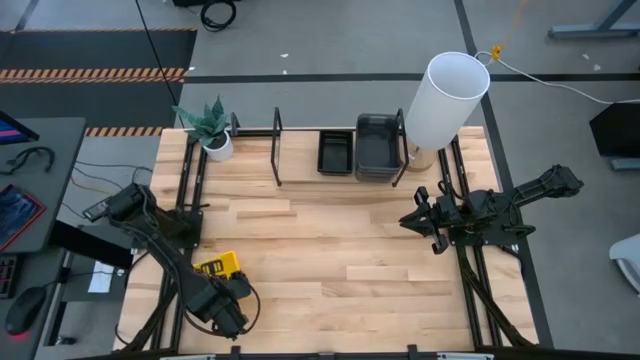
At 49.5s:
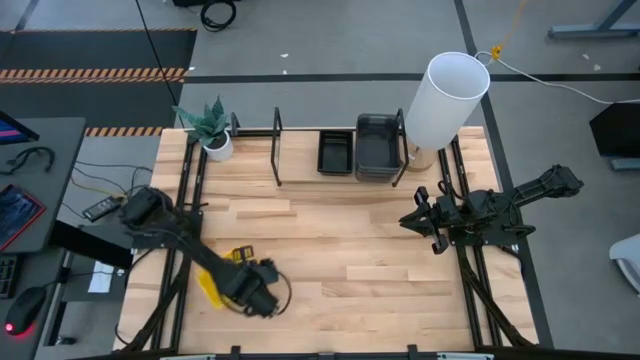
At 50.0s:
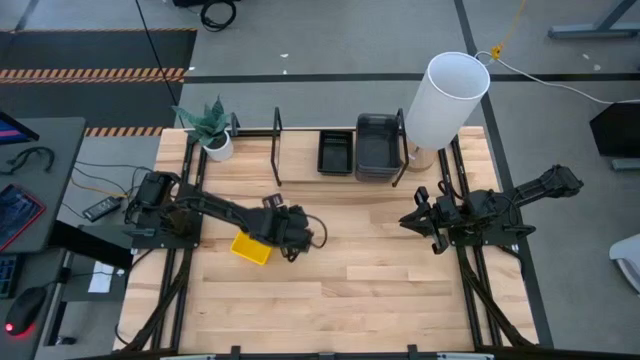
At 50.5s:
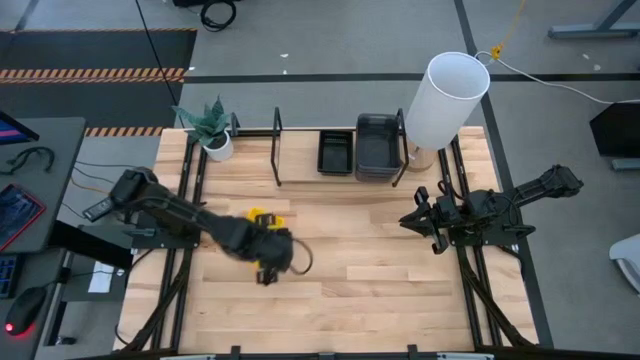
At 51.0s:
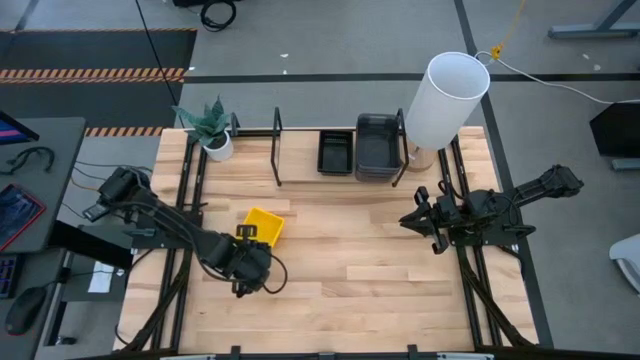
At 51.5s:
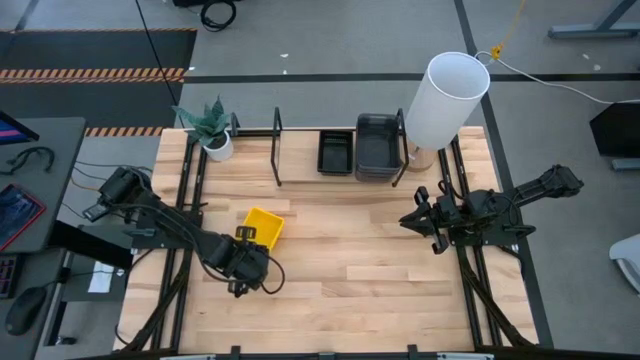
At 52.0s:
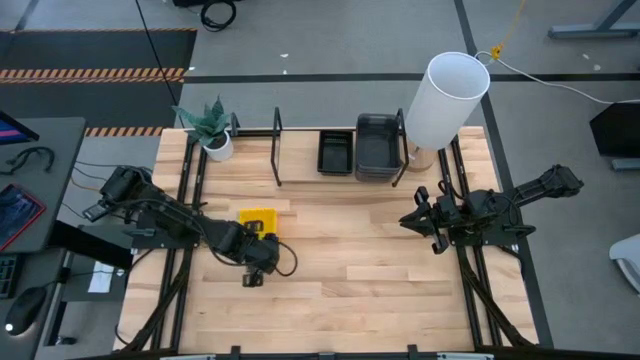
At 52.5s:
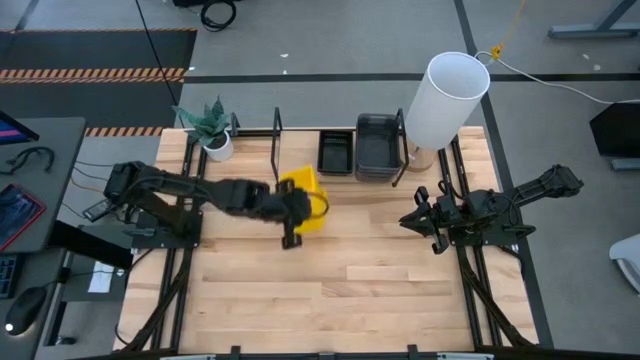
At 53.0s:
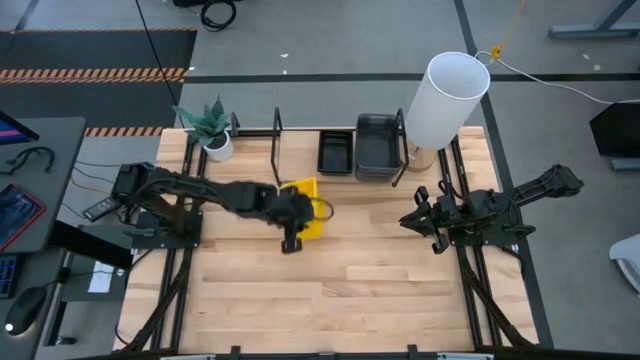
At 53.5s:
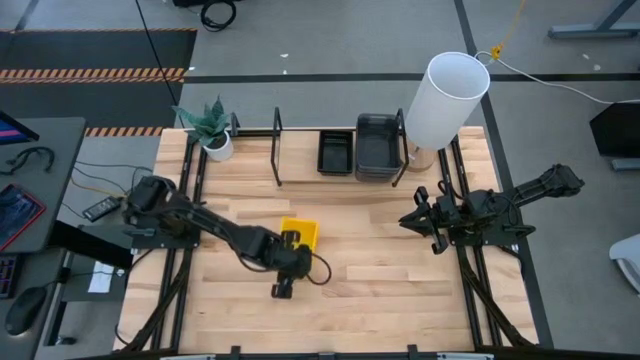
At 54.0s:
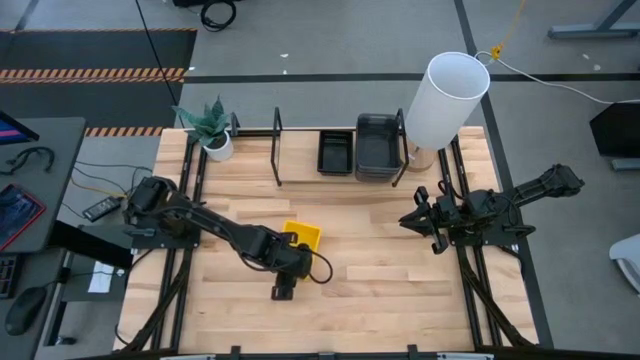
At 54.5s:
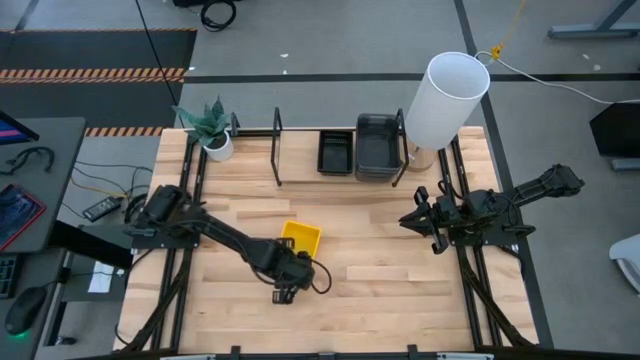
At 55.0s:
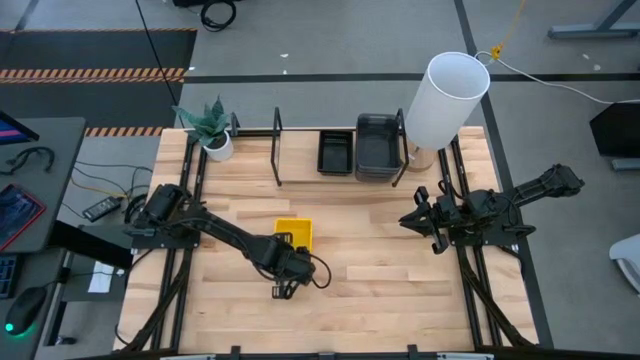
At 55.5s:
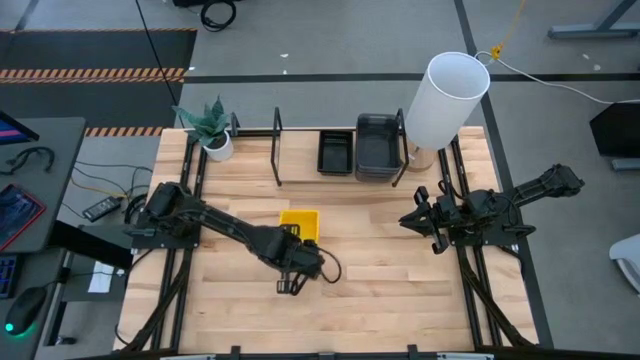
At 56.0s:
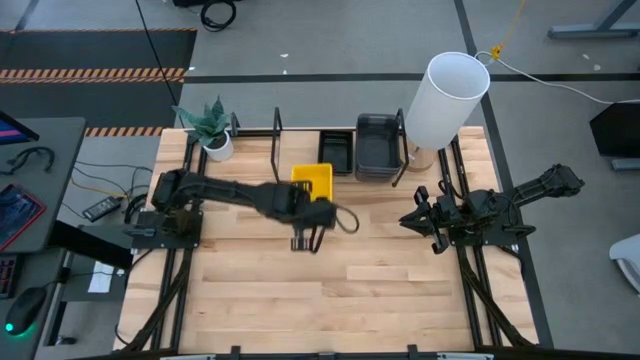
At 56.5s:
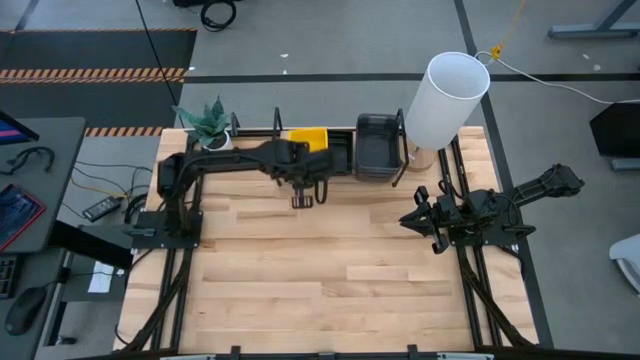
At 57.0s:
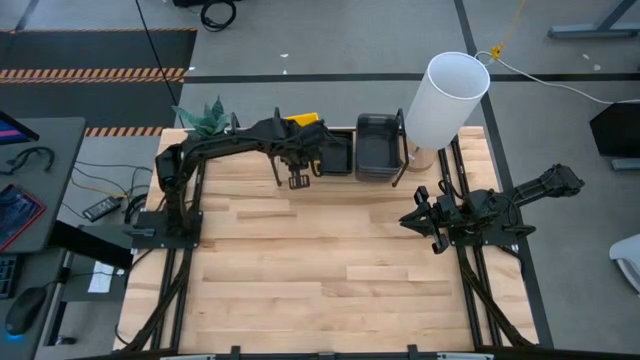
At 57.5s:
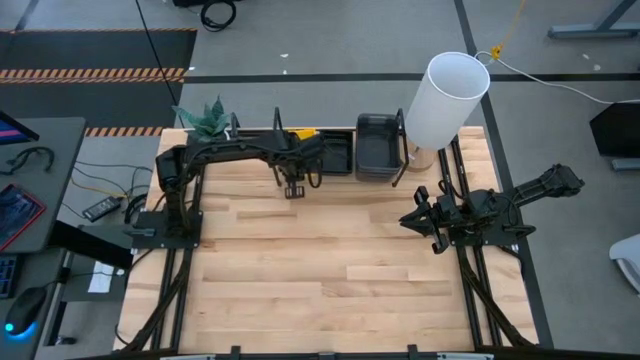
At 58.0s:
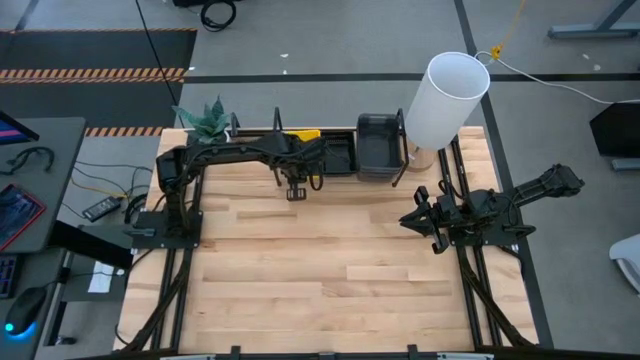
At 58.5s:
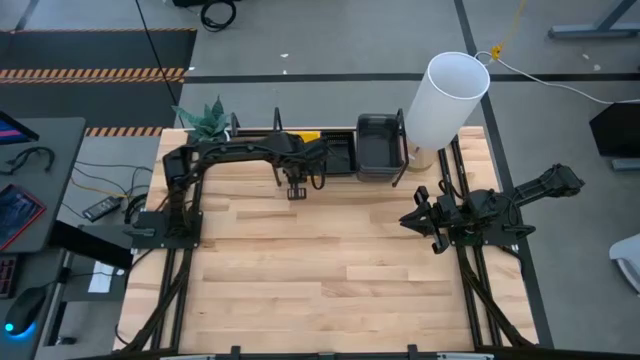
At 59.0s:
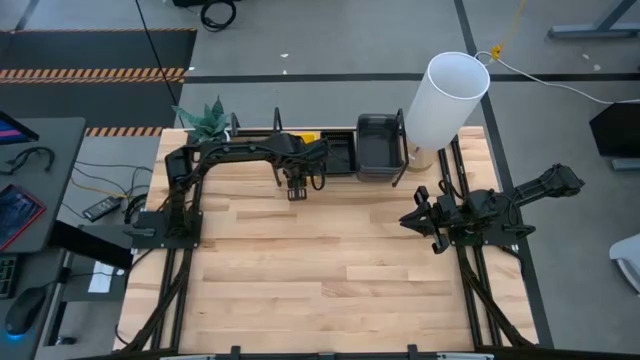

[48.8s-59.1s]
Task: Stack baskets on shelf by color
Put the stacked yellow bins on the shelf

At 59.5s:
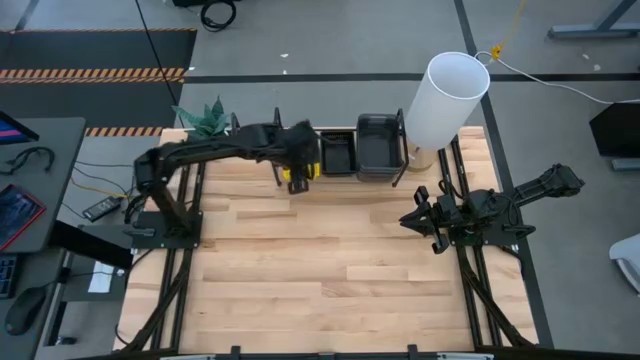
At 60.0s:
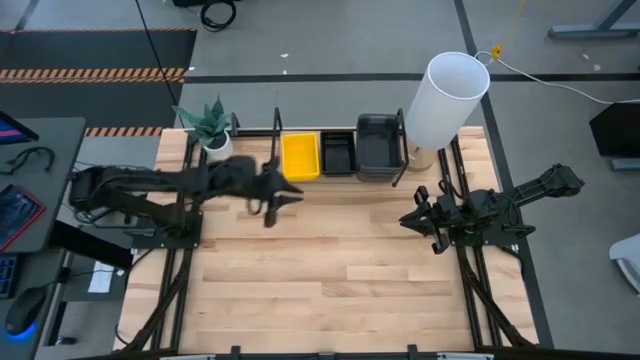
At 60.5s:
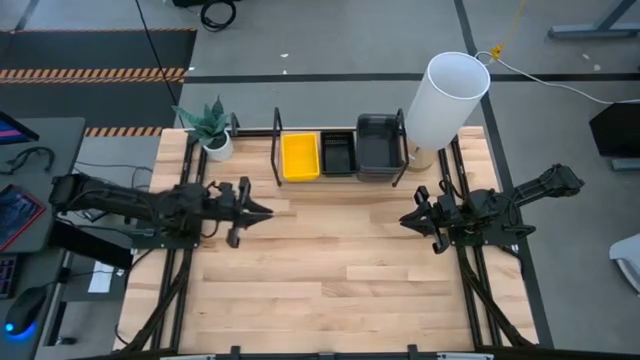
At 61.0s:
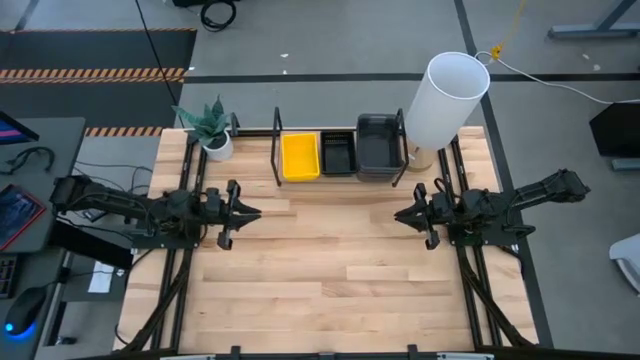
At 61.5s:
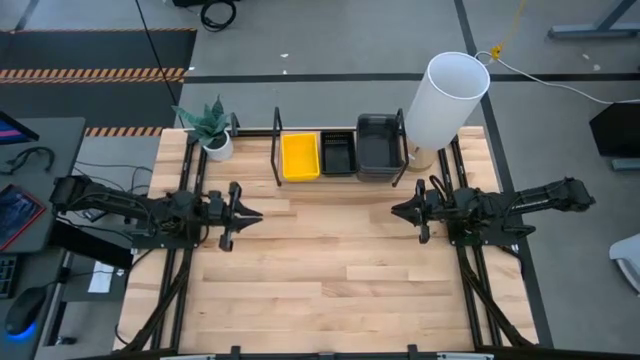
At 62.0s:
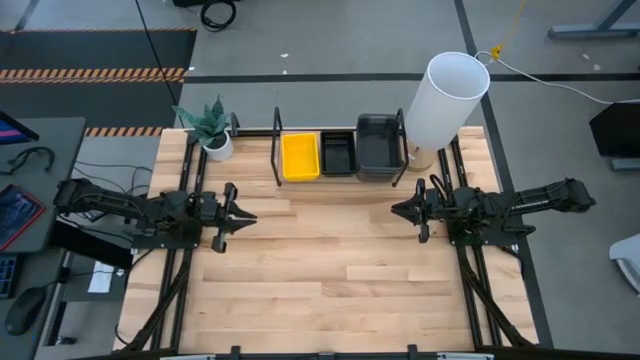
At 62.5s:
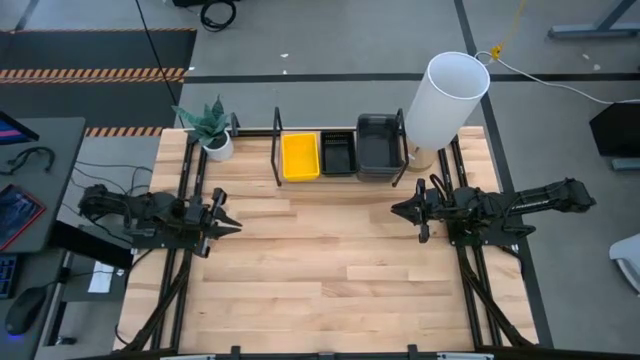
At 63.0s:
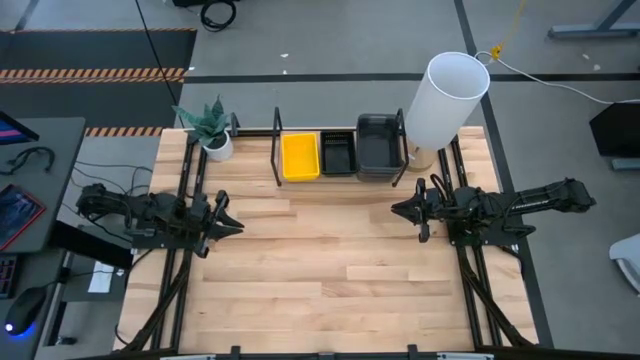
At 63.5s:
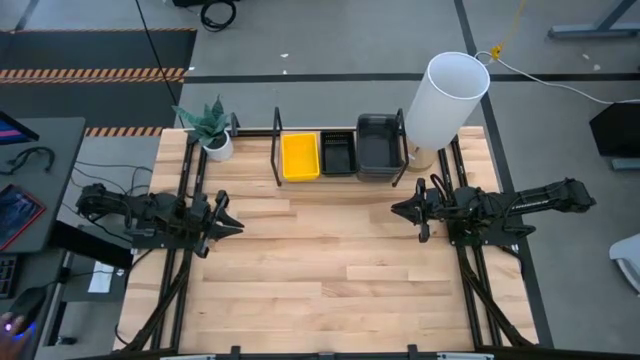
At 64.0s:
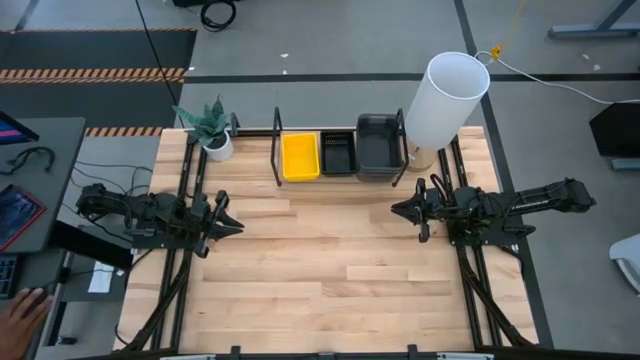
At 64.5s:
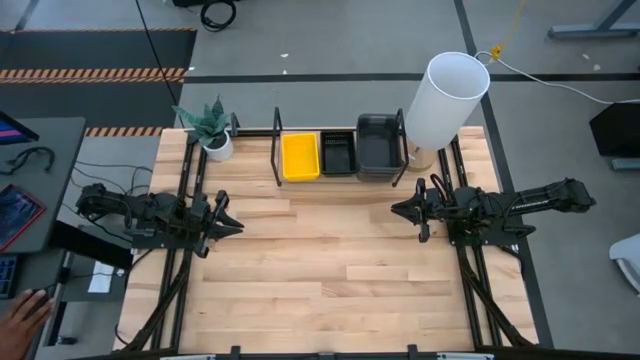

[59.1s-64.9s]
Return to Home Position

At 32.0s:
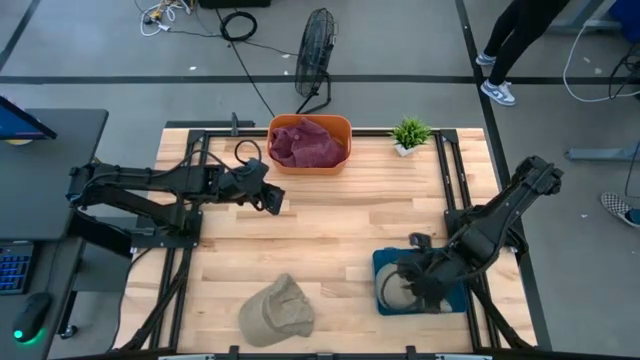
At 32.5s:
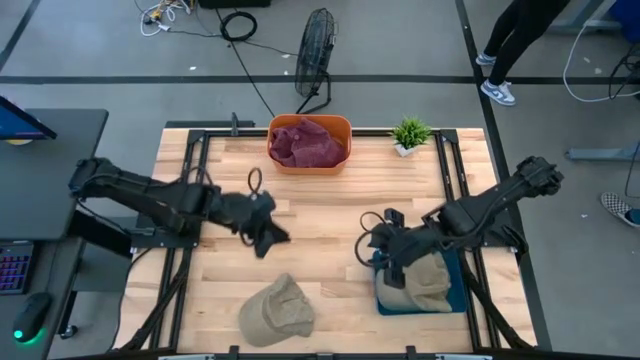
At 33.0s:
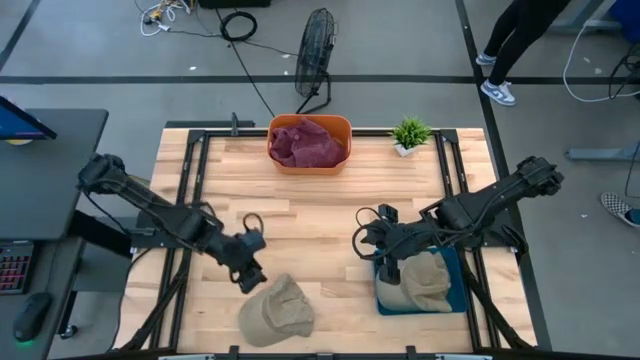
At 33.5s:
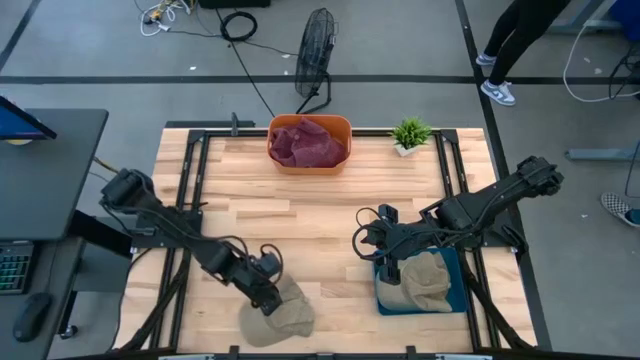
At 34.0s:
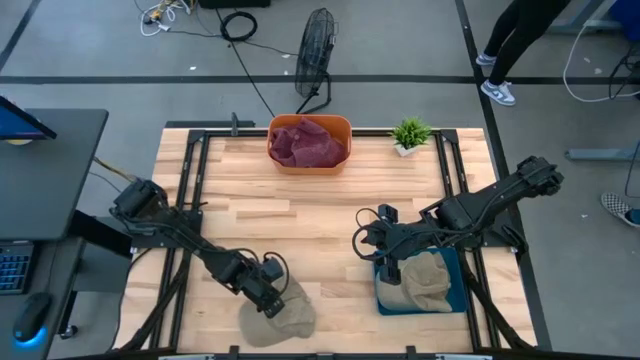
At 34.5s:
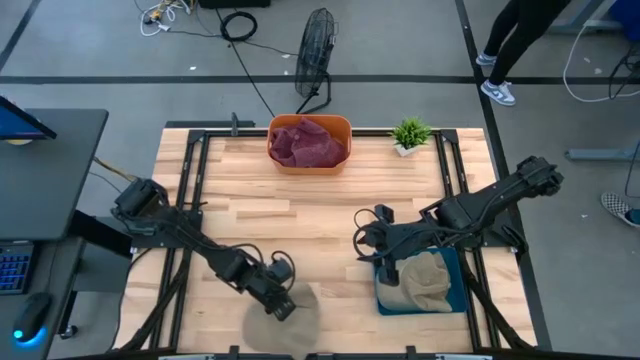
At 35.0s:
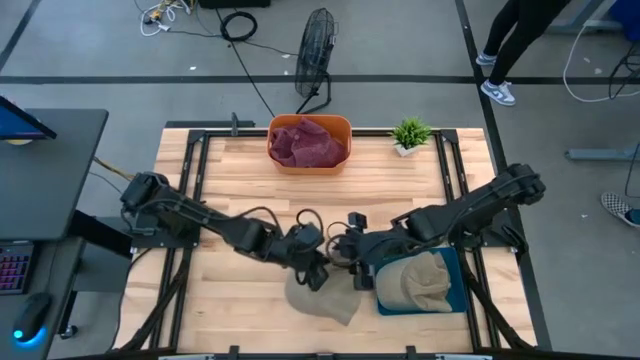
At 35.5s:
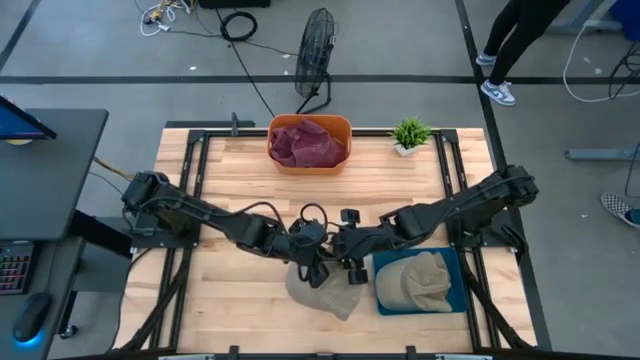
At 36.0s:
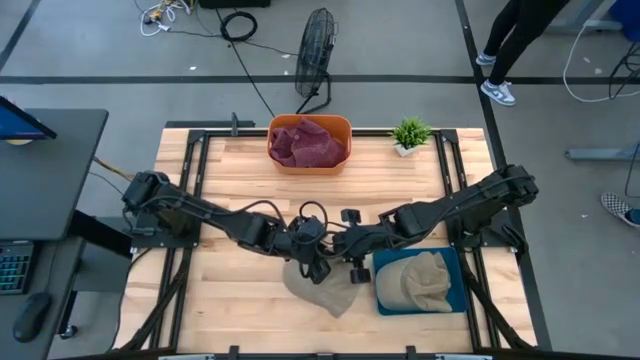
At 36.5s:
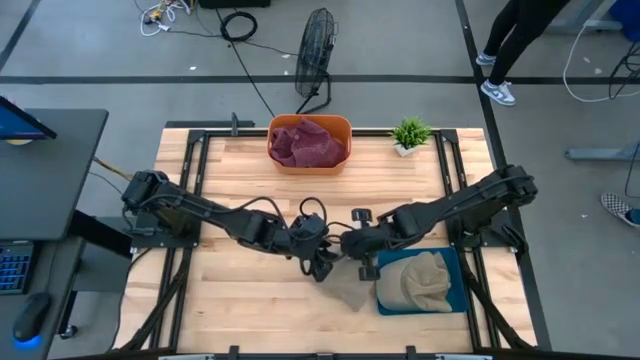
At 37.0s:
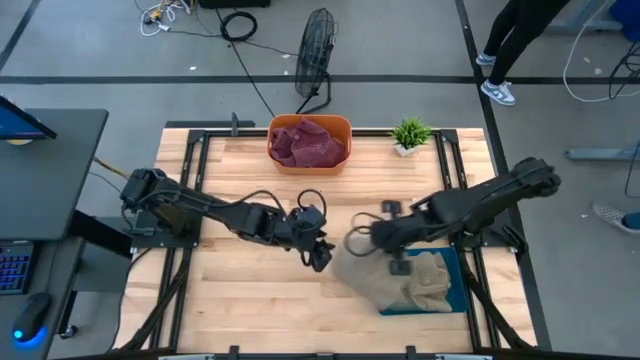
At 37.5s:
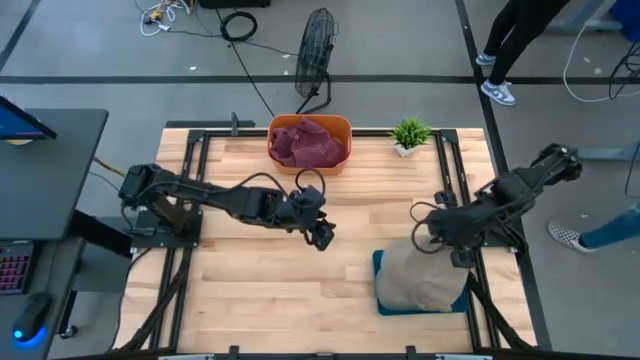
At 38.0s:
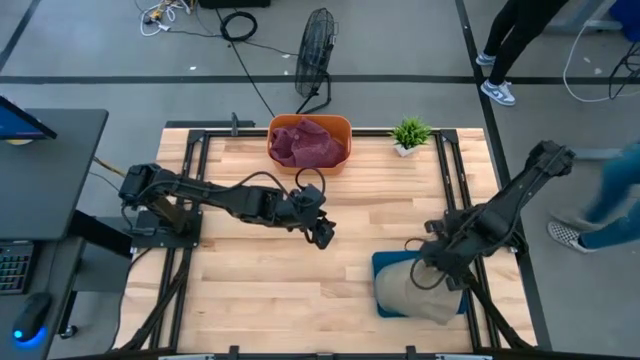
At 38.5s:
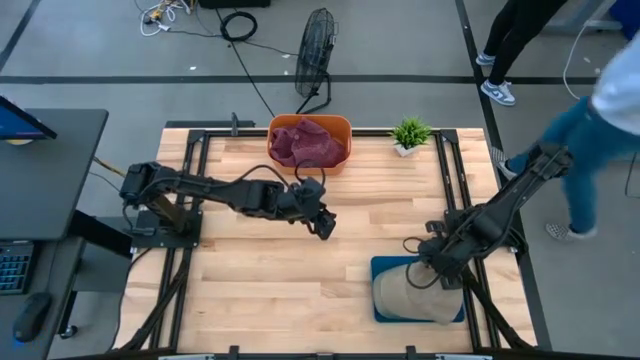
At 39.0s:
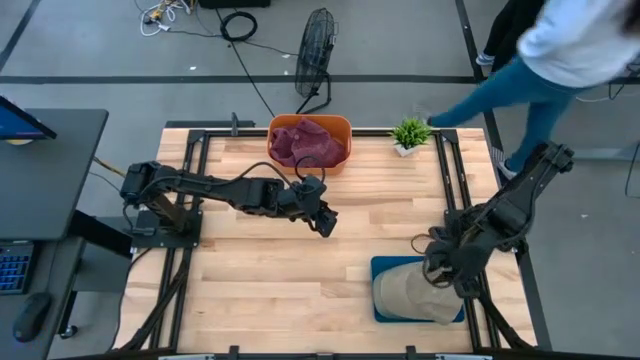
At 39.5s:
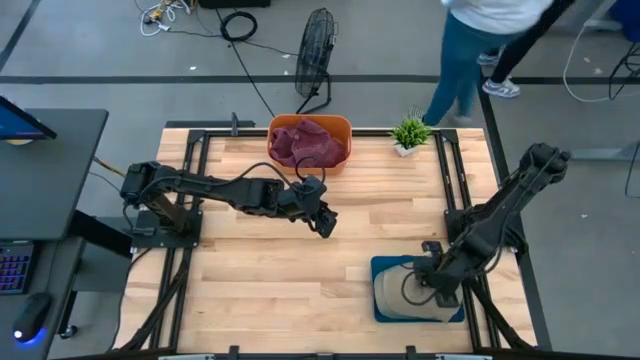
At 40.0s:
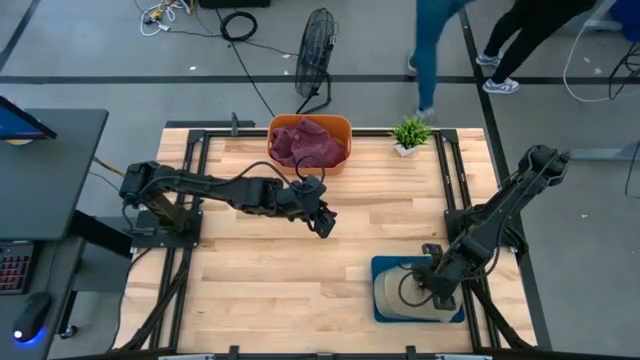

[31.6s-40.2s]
Task: Pick & Place hat
Put the brown cap into the blue bin
